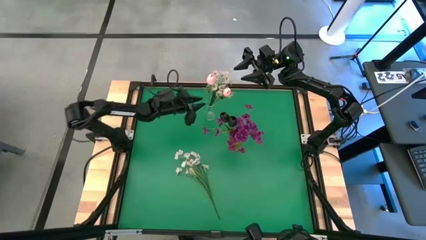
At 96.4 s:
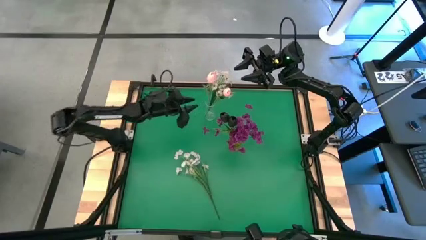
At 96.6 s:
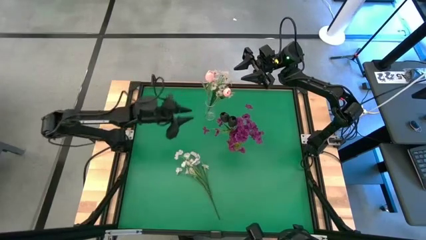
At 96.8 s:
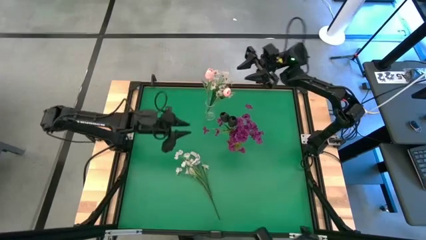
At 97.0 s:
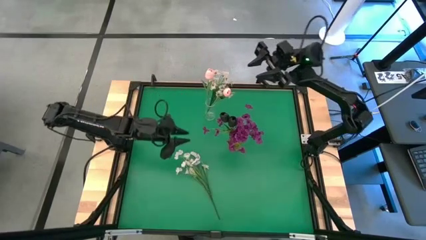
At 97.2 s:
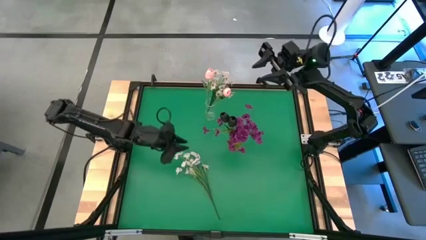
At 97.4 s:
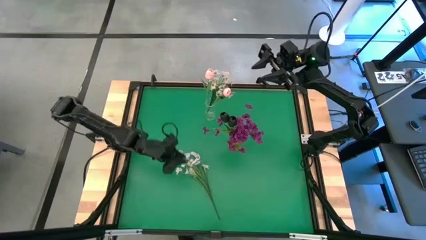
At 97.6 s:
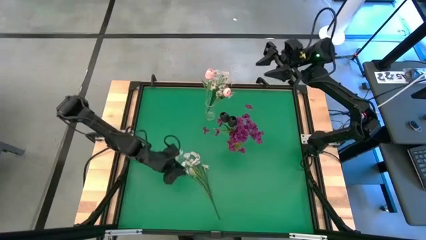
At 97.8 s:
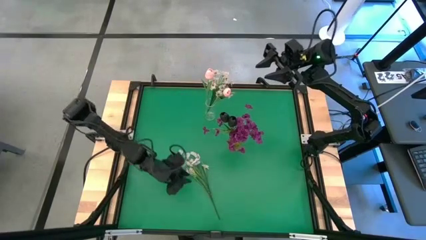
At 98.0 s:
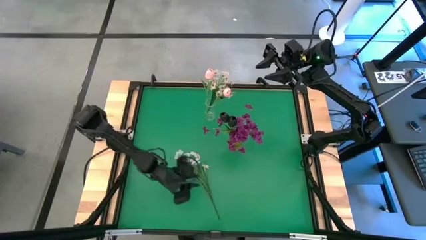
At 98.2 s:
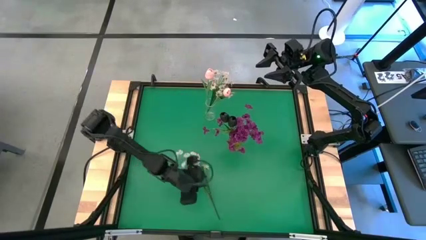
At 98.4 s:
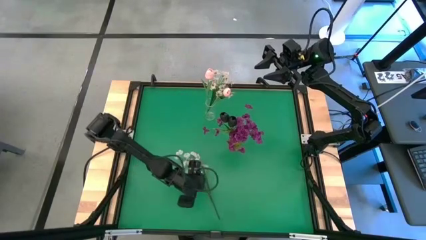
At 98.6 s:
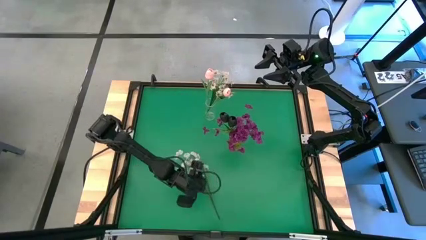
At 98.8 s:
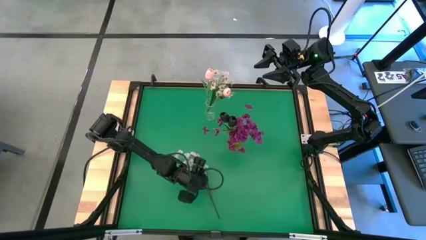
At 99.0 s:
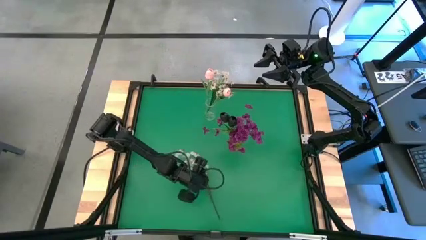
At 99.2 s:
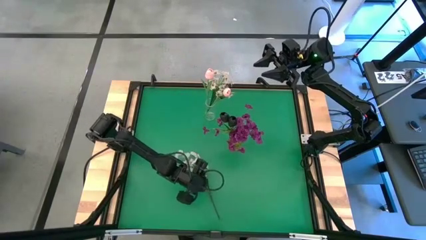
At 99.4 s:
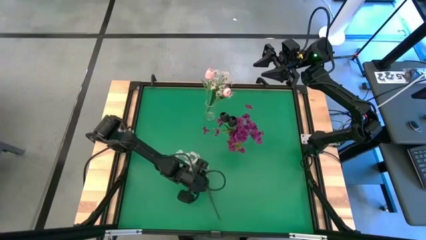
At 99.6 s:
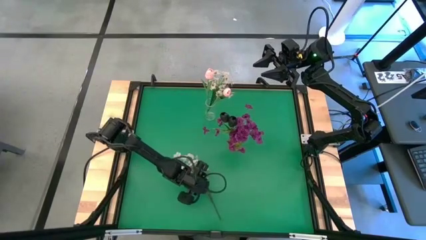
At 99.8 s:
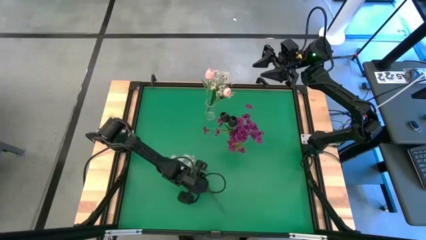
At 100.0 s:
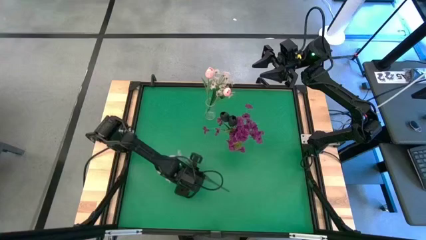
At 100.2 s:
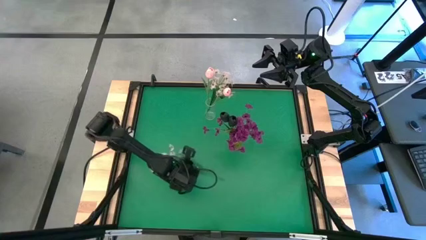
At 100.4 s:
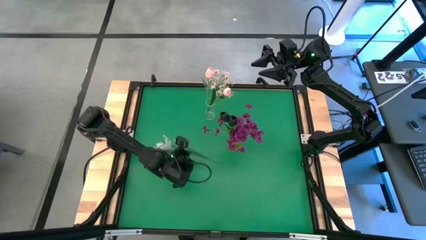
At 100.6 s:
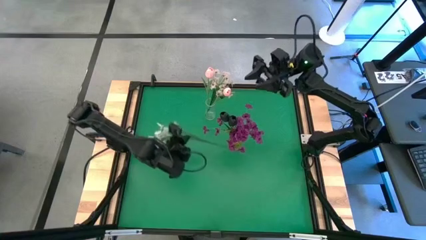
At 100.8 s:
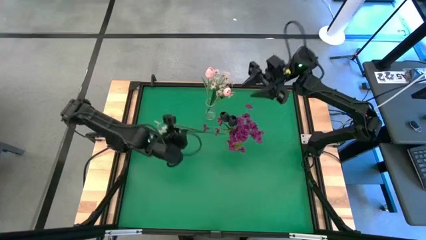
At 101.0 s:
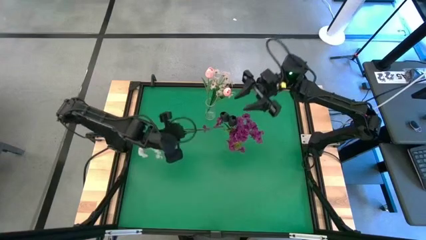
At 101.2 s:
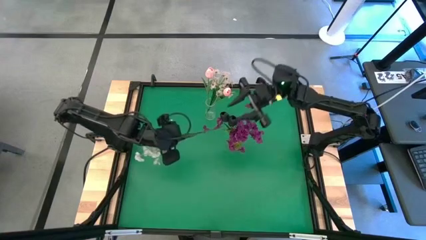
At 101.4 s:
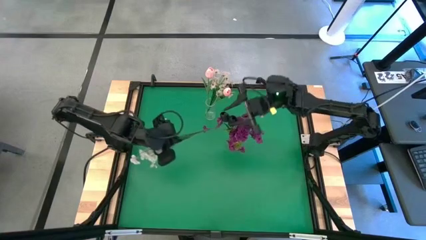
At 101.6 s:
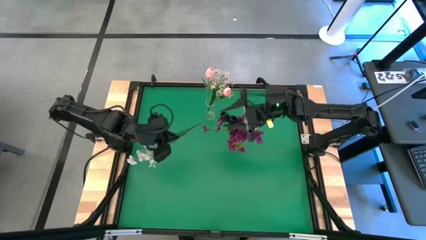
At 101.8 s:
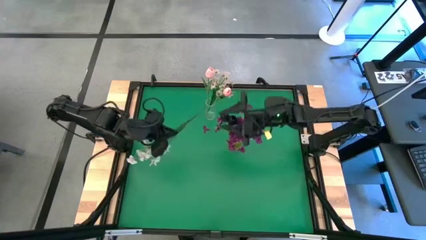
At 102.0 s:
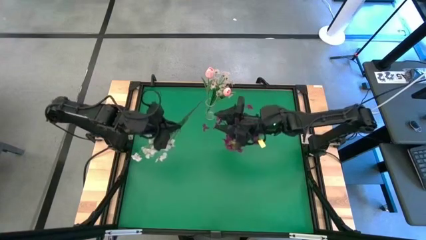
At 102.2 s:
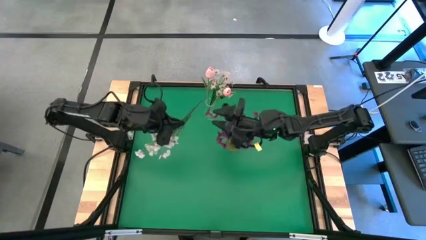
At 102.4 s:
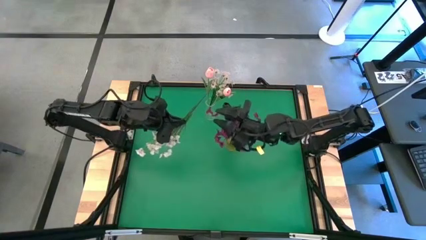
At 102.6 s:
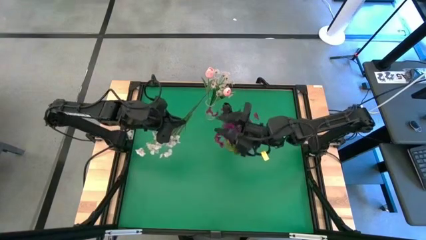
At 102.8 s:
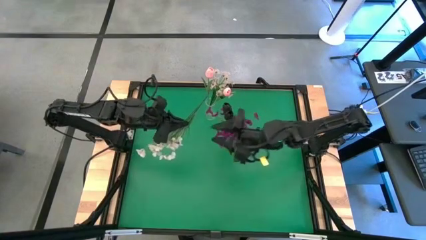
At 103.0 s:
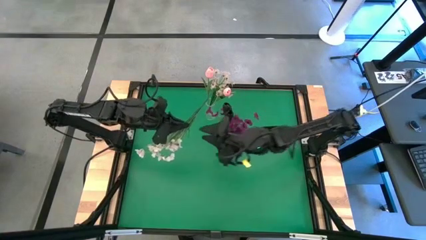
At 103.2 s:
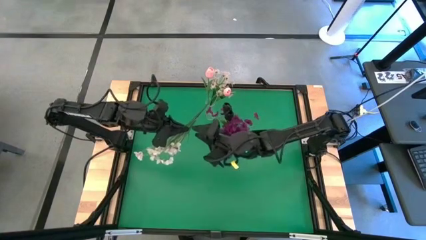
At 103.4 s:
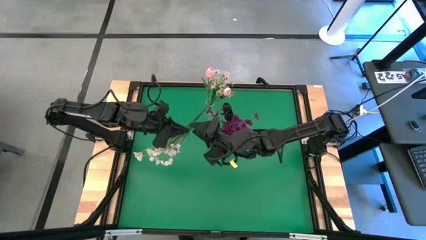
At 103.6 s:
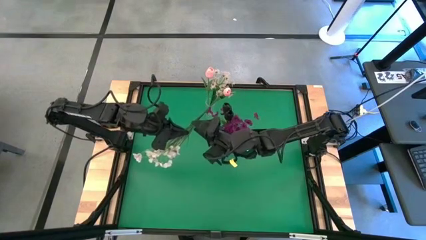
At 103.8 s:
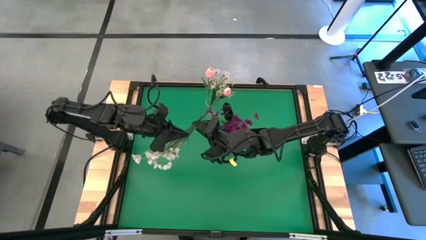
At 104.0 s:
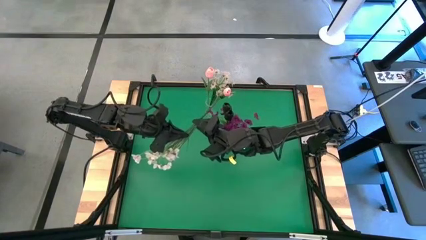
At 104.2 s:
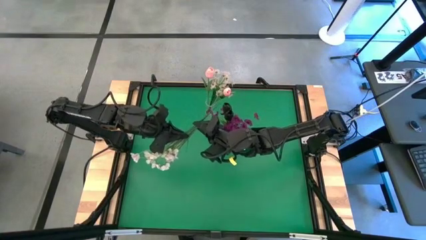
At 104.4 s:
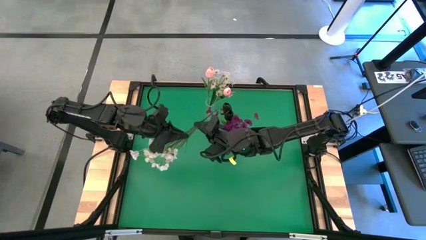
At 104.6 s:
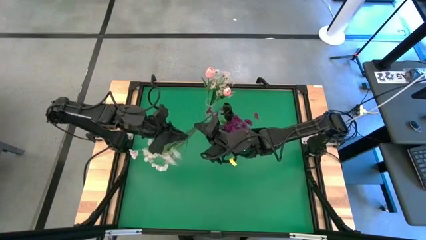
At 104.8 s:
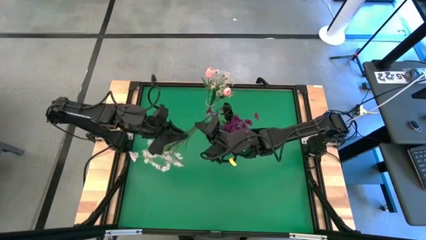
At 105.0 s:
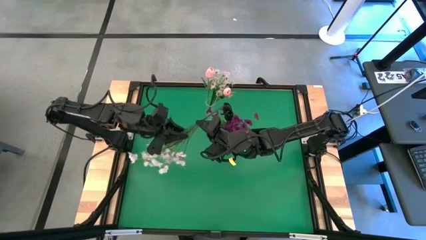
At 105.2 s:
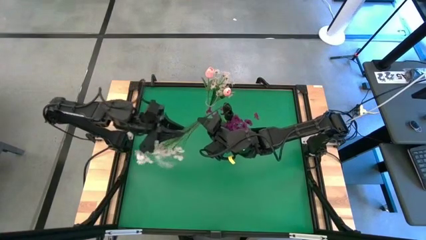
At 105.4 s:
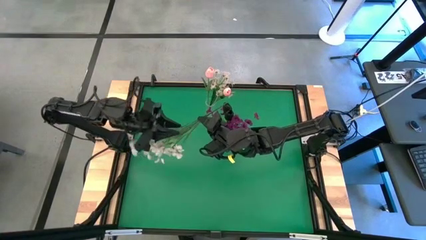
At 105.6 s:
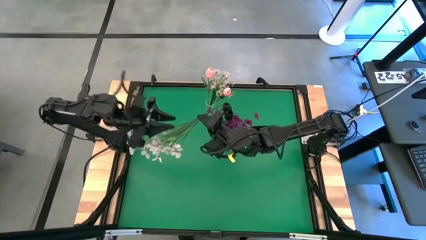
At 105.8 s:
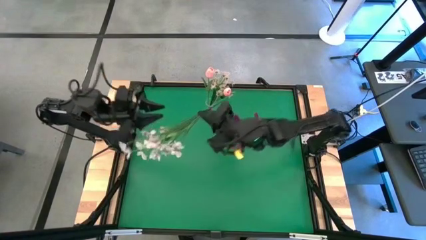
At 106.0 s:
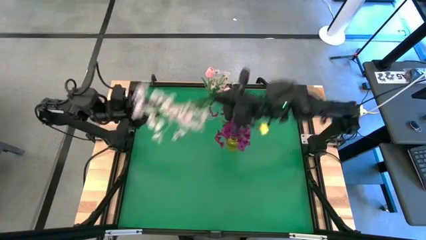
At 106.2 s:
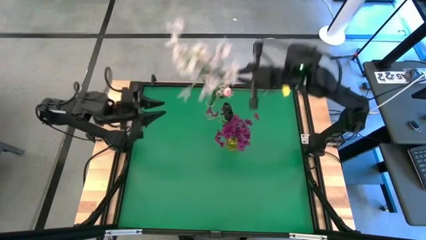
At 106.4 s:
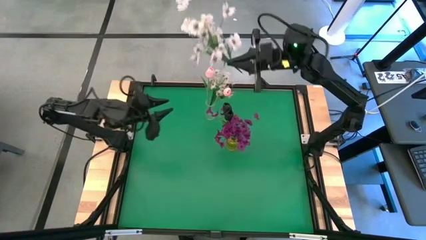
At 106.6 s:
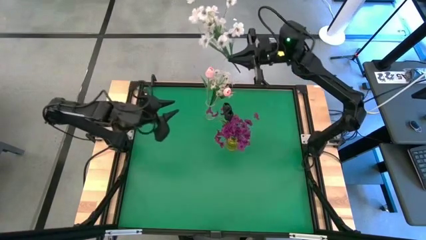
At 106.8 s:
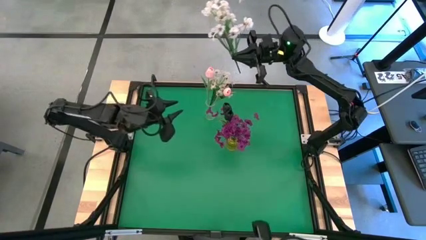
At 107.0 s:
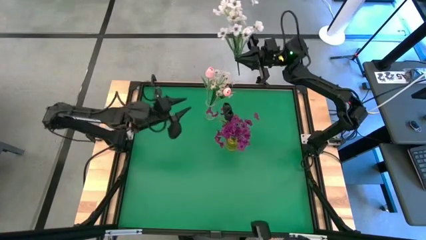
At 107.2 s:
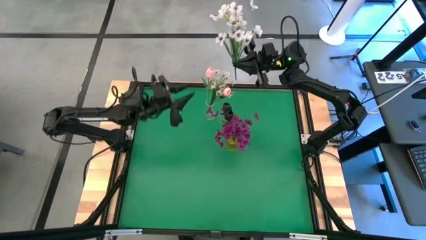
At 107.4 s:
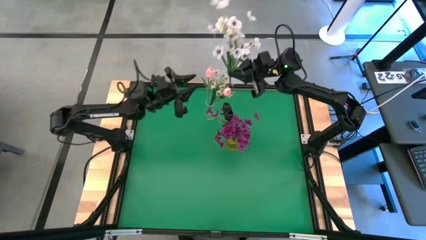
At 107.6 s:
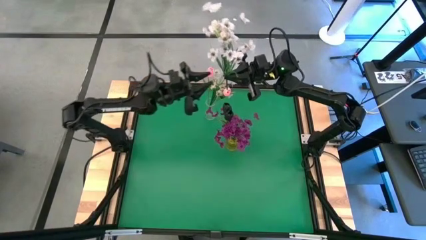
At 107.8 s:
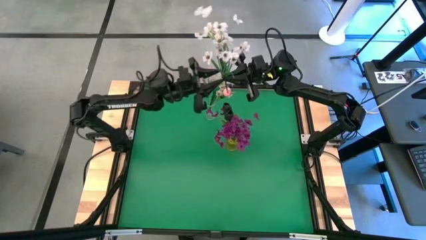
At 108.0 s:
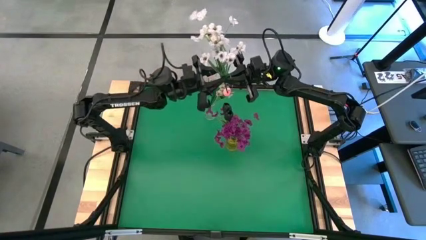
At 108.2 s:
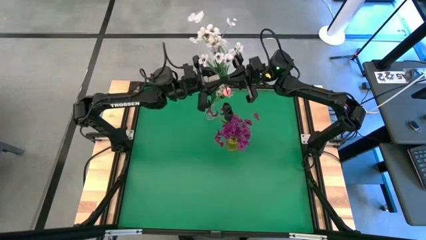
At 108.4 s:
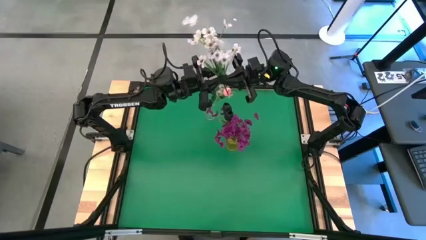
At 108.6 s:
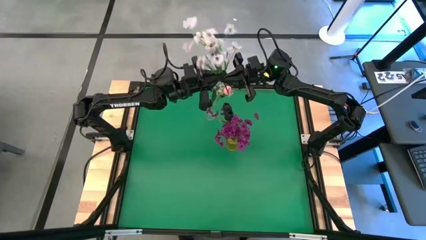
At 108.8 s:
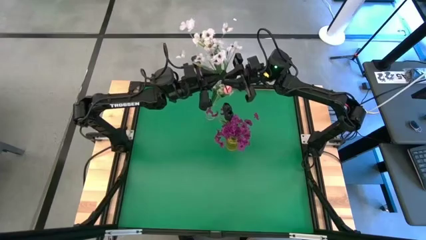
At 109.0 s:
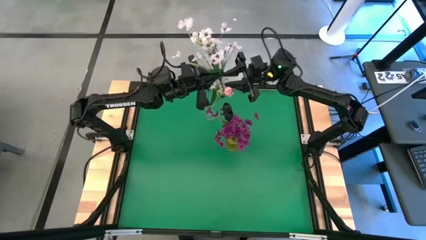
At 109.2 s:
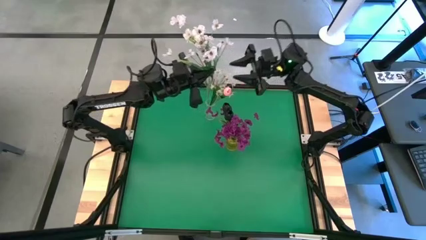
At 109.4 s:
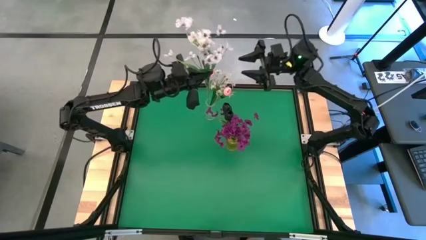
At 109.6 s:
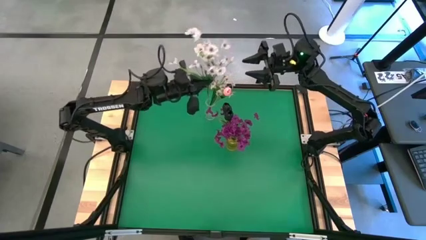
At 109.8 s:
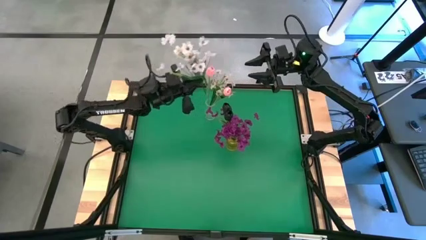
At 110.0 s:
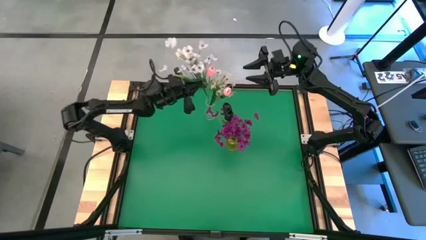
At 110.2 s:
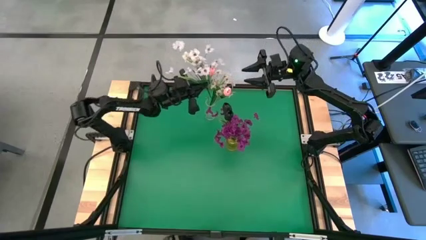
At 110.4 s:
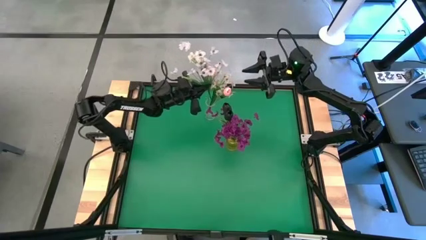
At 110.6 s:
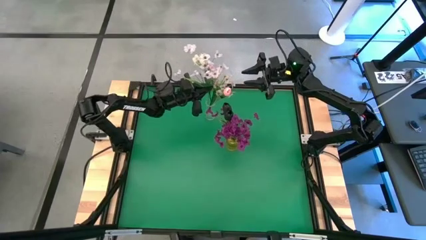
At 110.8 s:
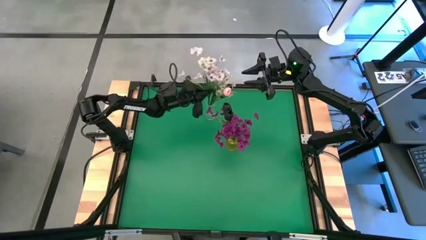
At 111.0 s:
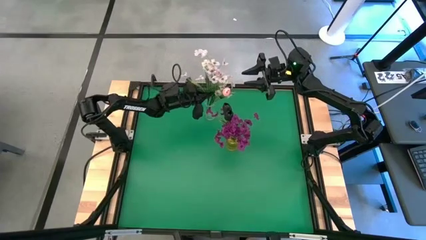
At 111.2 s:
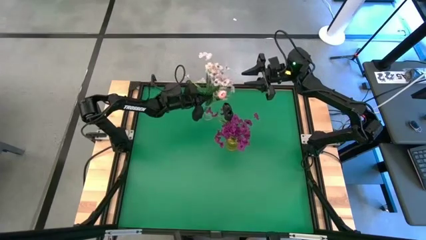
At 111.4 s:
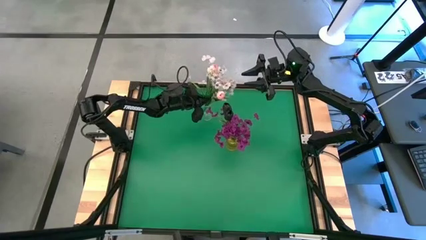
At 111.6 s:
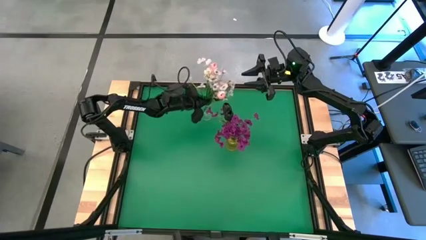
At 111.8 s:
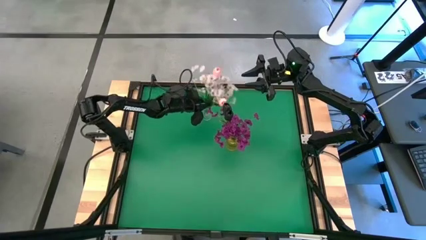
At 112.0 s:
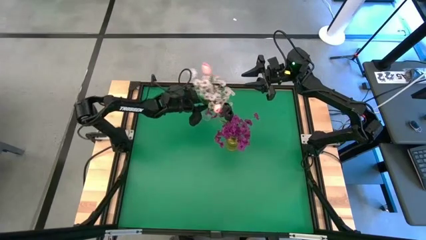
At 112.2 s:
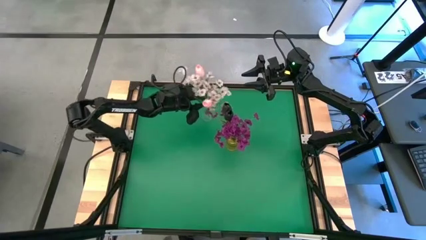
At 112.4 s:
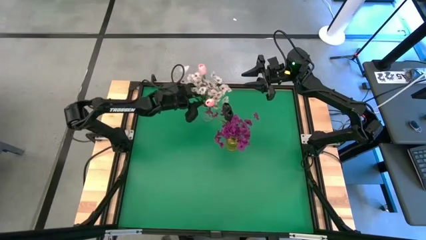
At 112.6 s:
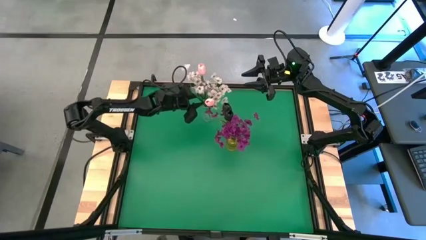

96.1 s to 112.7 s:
Task: Sort flowers into vase by color
Put the white flowers into the transparent vase
